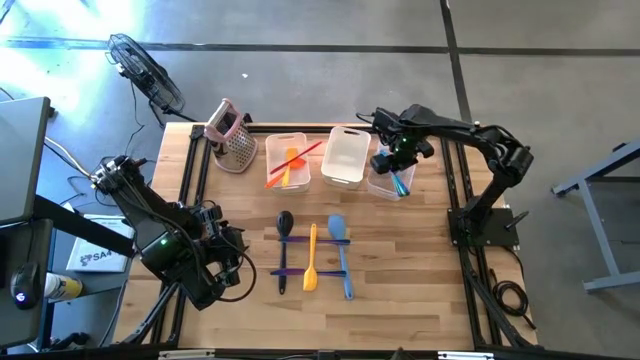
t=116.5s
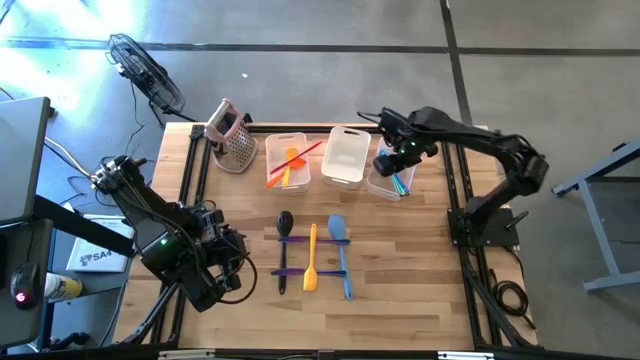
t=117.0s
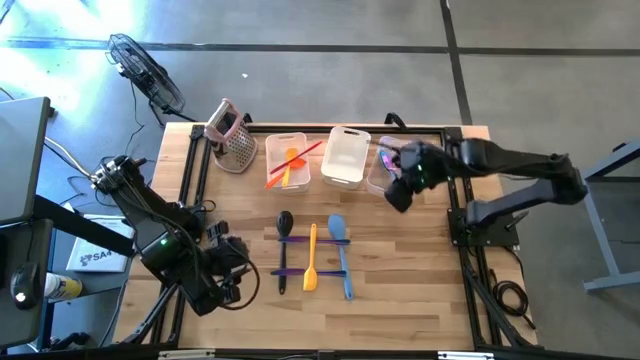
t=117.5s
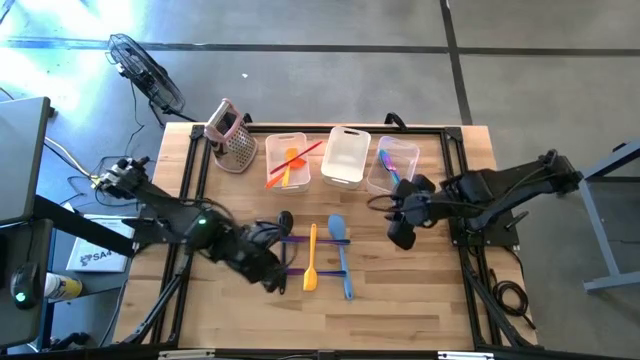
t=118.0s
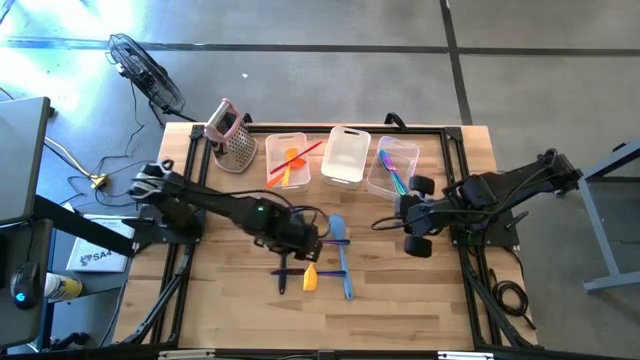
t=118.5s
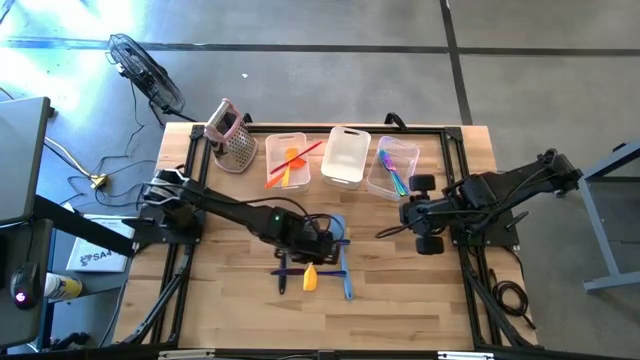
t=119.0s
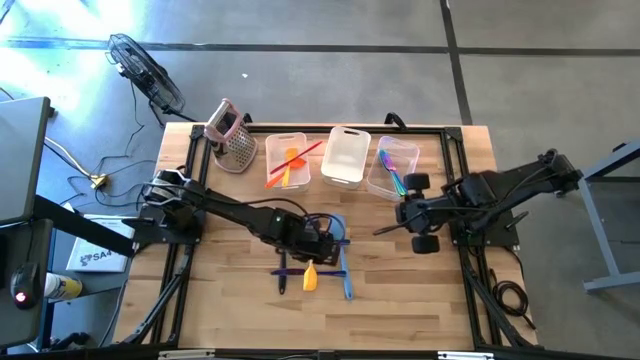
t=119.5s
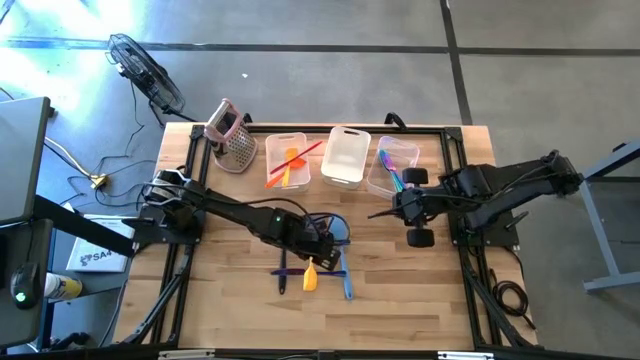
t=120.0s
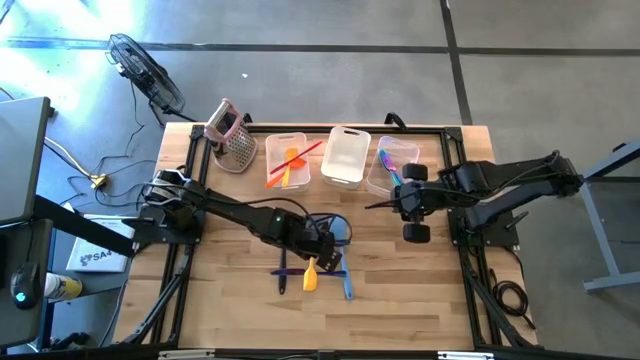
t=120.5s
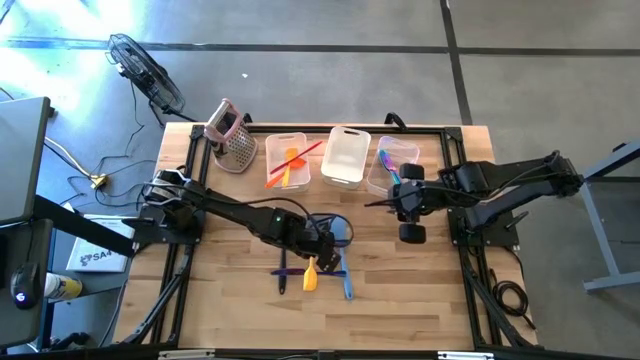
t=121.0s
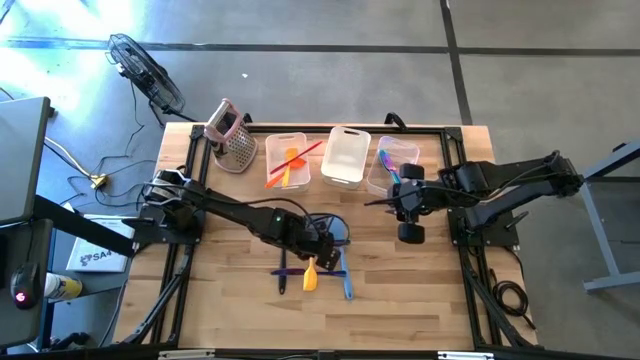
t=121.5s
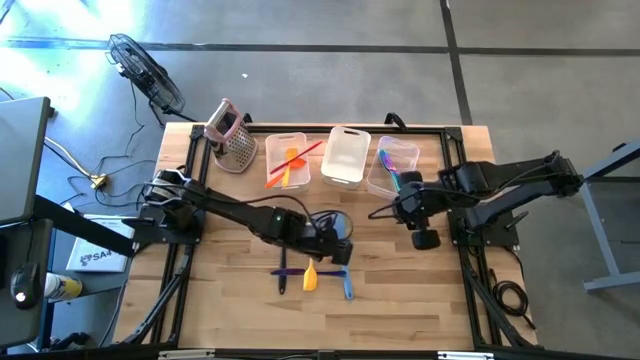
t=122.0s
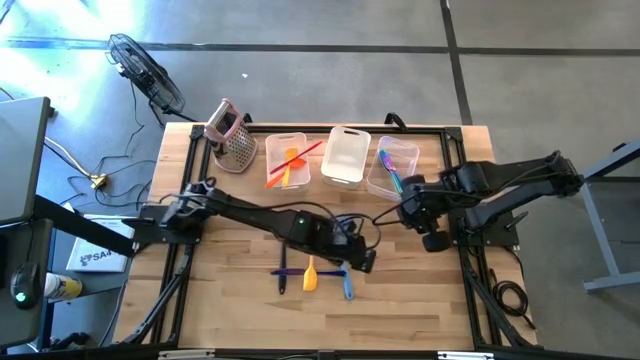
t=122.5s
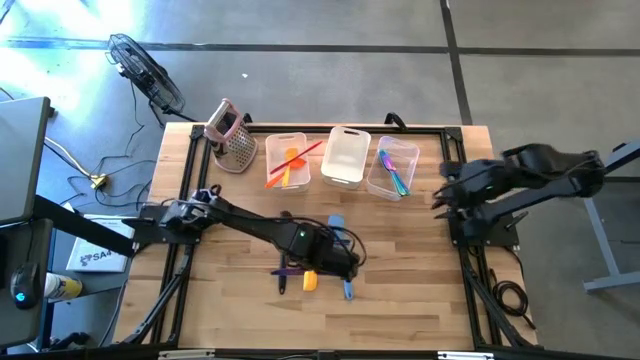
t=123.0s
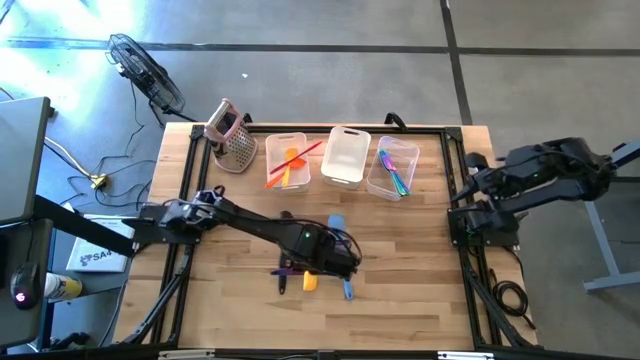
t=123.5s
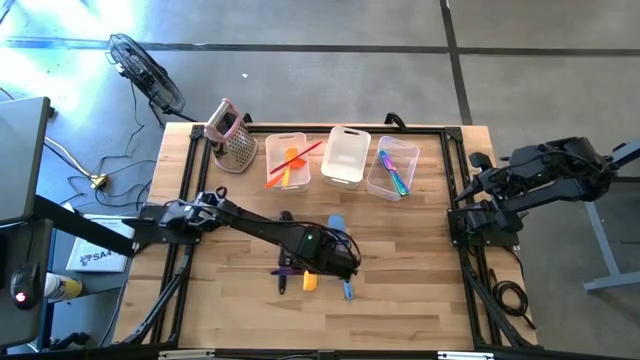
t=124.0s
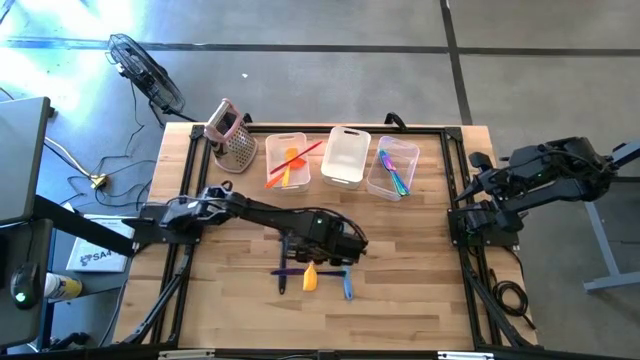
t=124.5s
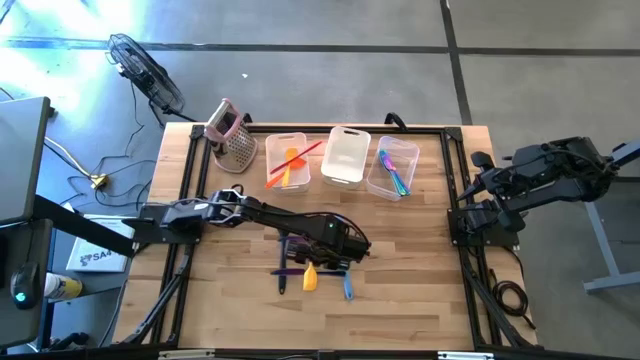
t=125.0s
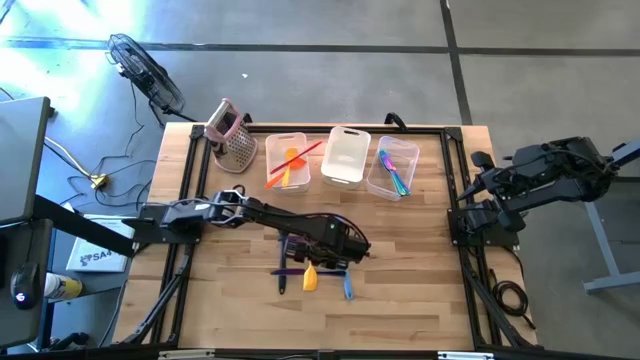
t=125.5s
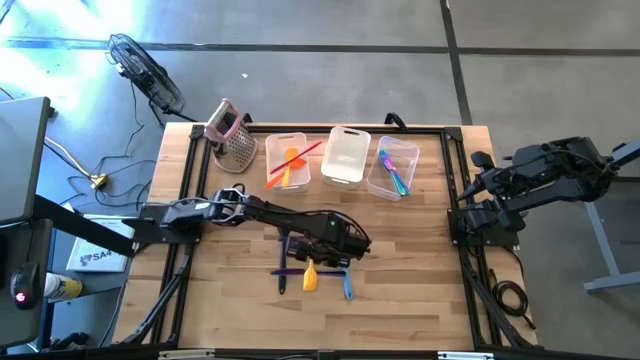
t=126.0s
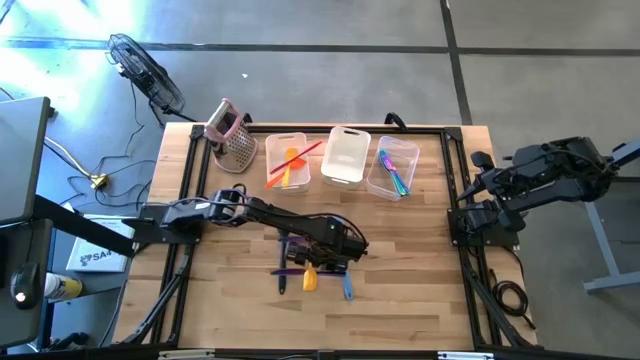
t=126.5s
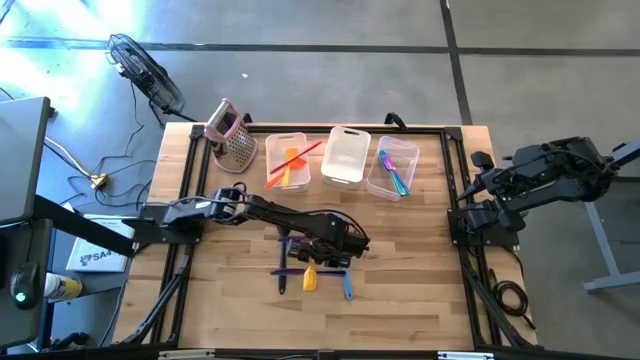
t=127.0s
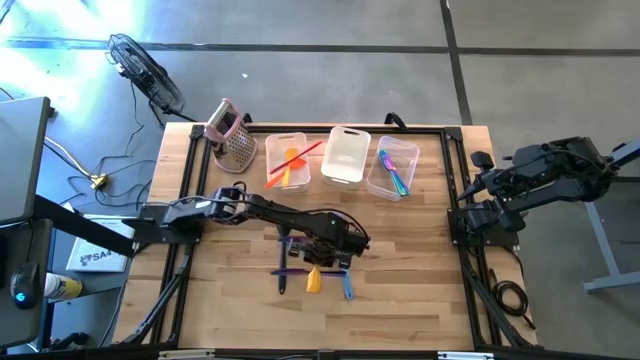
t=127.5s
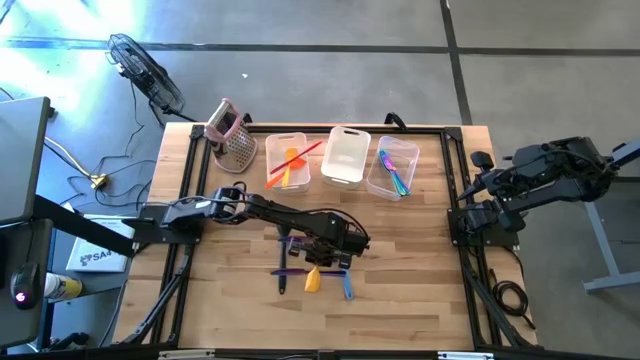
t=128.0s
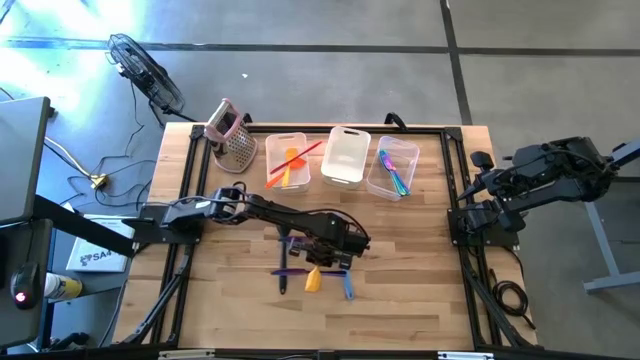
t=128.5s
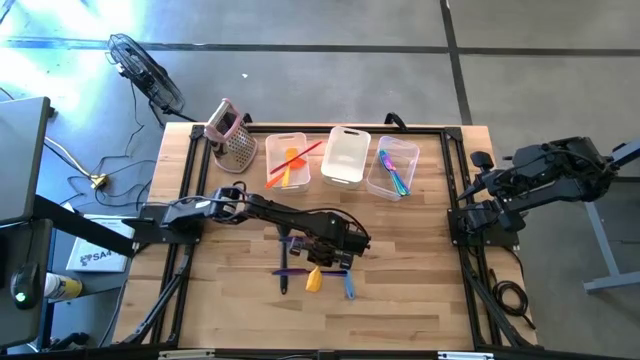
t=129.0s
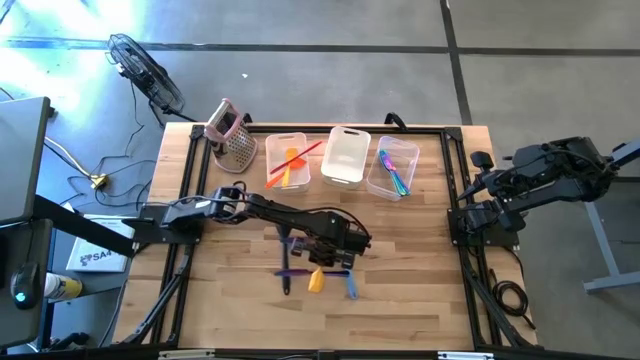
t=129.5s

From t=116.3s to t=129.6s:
Task: Pick & Place Kitchen Items
Put the yellow spatula into the left white bin

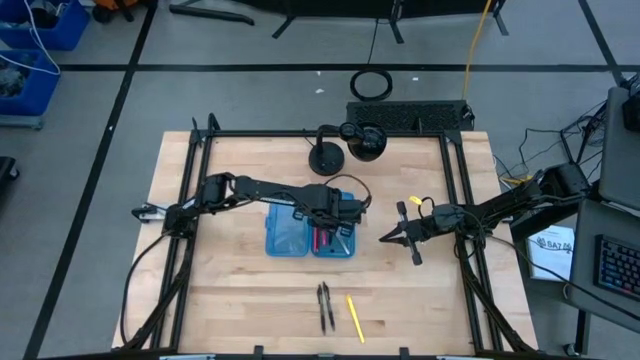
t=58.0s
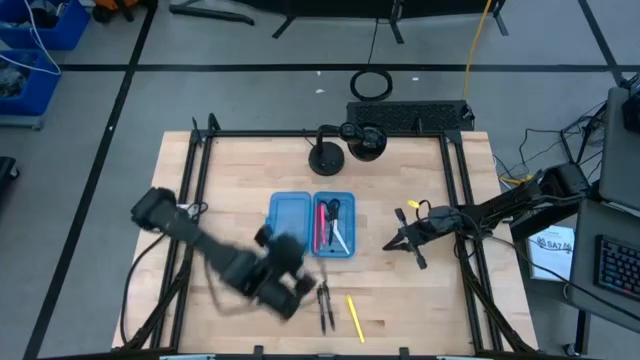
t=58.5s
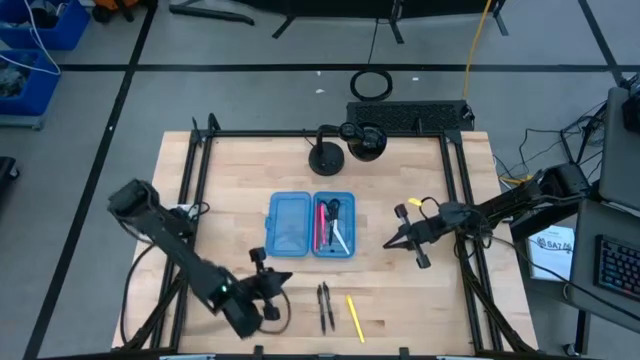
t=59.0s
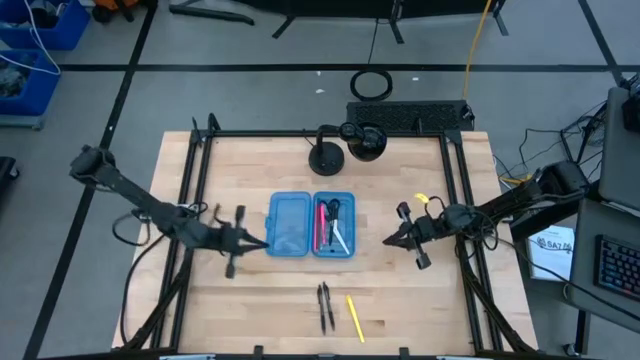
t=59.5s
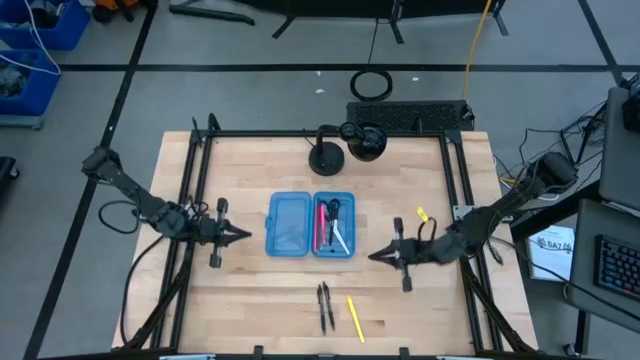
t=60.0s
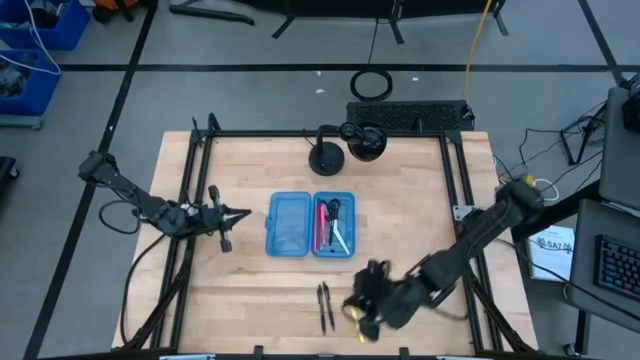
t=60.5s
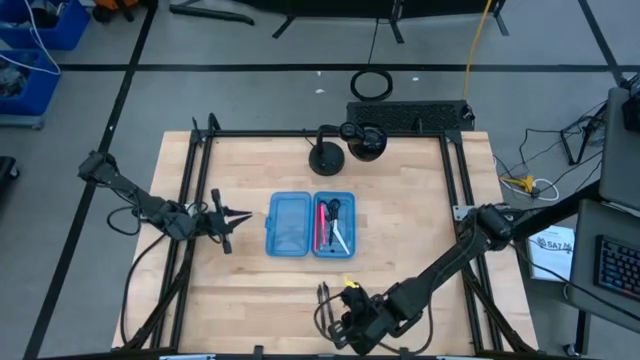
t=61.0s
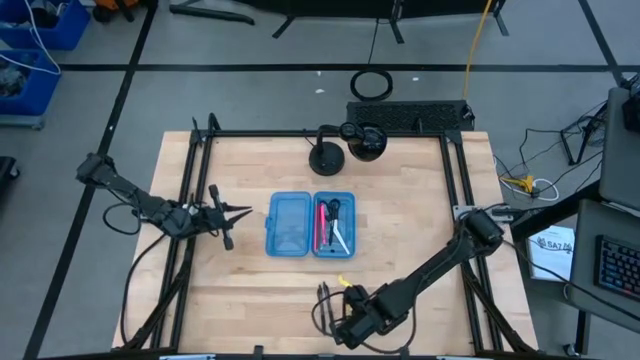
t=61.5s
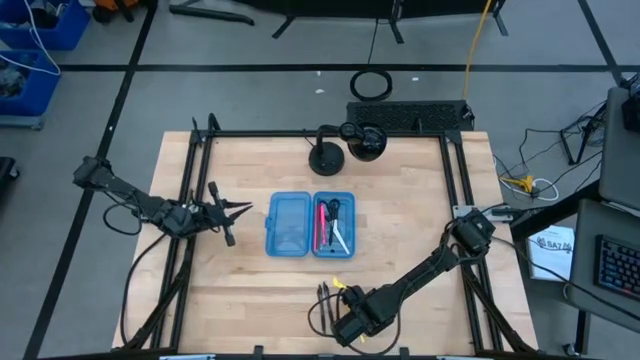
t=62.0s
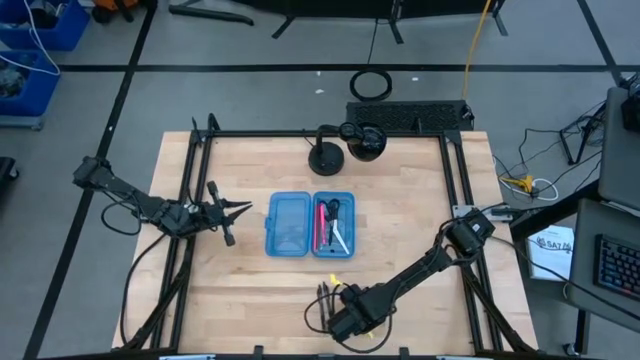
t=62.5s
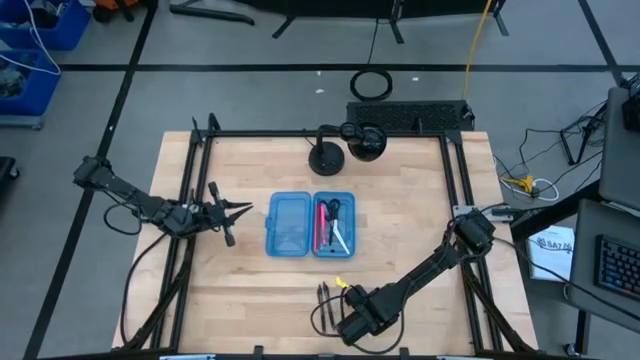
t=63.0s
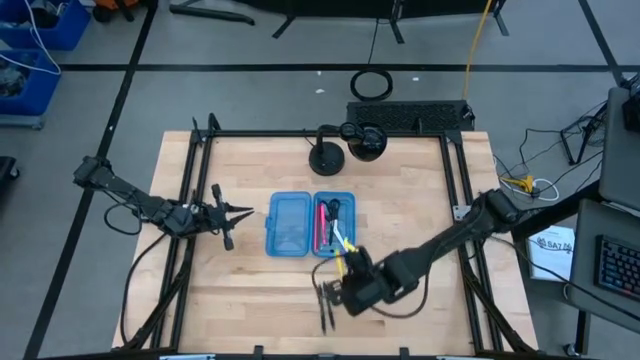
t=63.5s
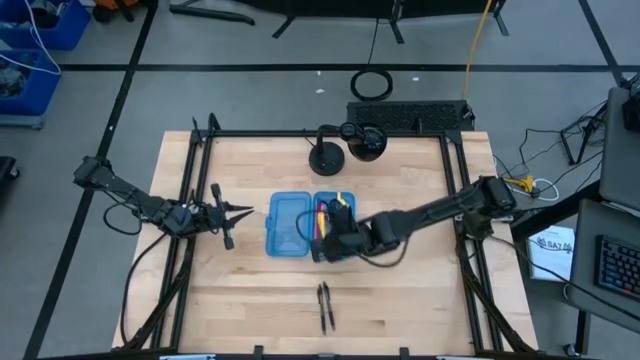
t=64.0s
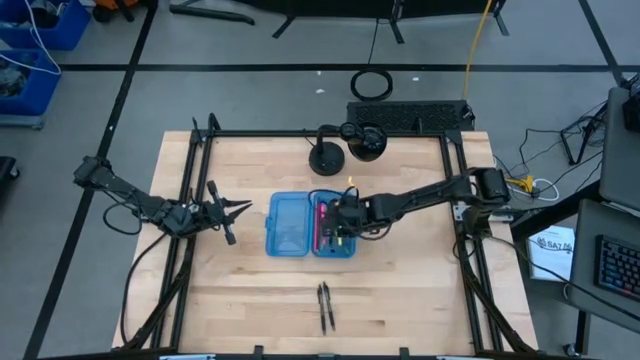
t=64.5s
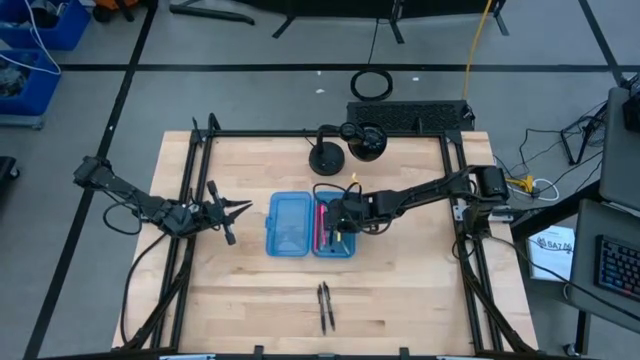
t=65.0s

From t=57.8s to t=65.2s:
Task: Pick & place school supplies into a supply box
Put the yellow pen into the blue supply box

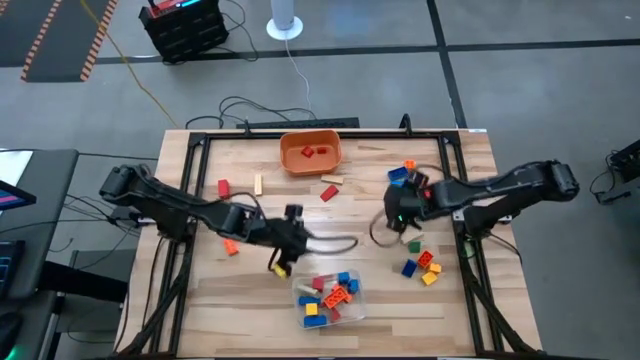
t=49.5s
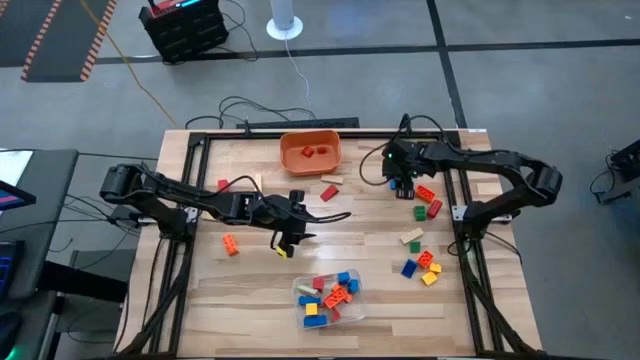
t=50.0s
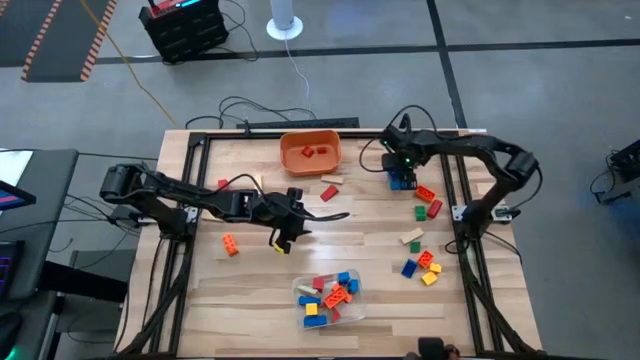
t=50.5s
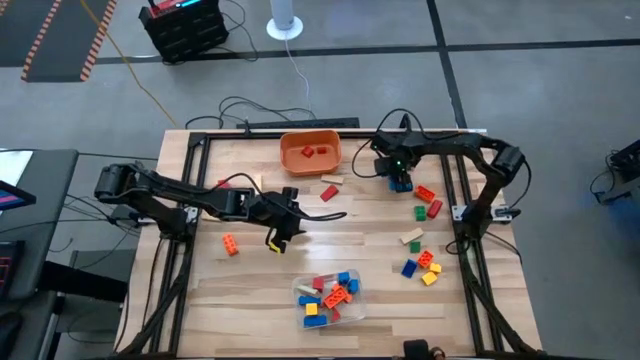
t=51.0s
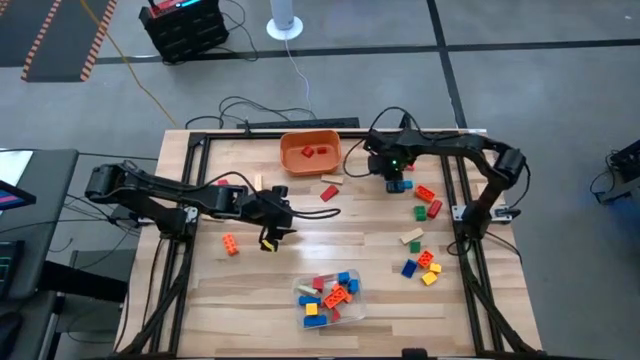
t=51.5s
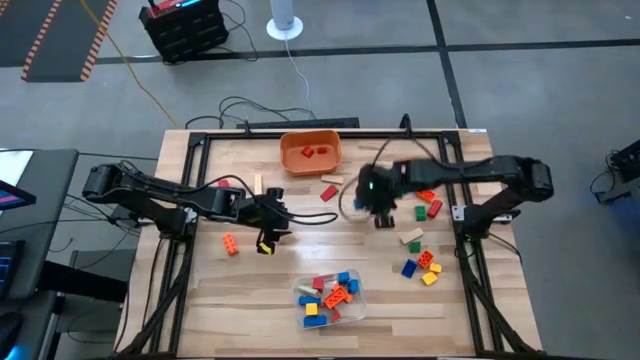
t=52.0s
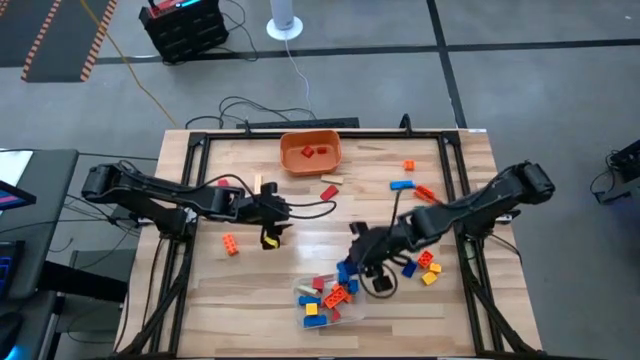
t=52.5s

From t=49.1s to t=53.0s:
Task: Sort blocks by size
Put the large blue game piece into the transparent bin
